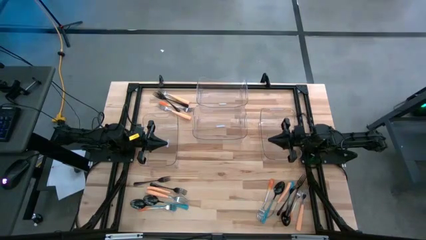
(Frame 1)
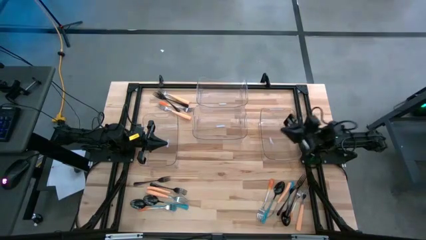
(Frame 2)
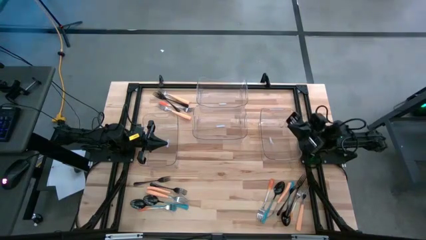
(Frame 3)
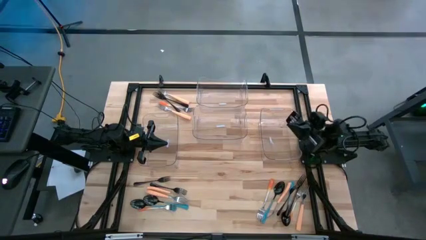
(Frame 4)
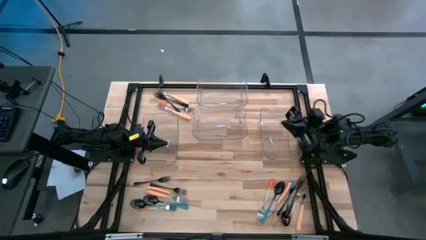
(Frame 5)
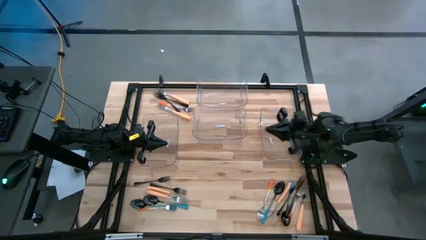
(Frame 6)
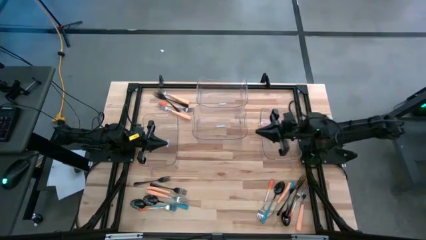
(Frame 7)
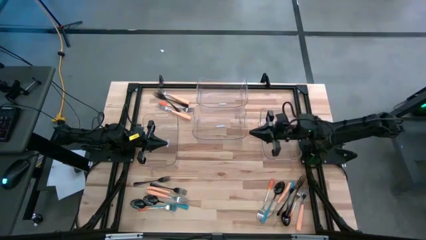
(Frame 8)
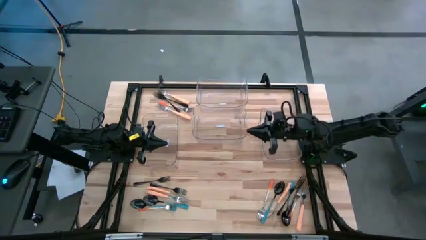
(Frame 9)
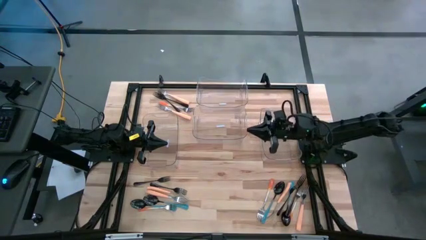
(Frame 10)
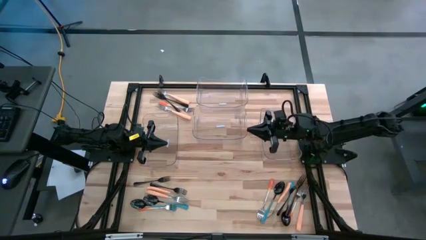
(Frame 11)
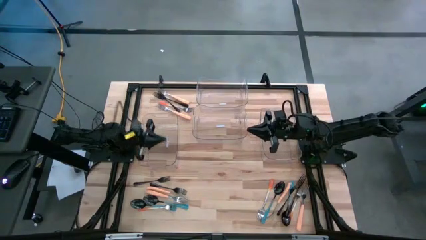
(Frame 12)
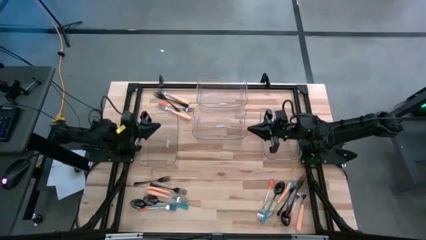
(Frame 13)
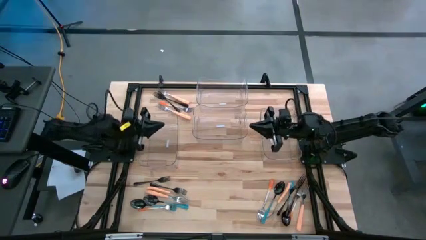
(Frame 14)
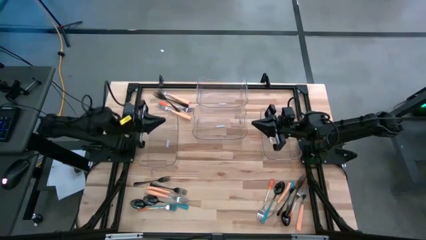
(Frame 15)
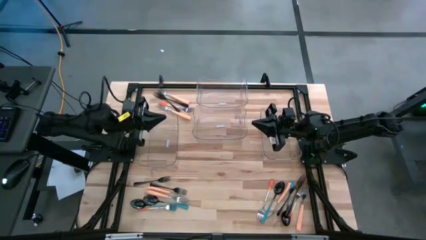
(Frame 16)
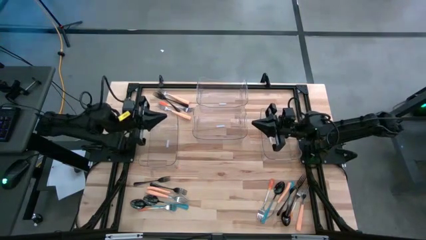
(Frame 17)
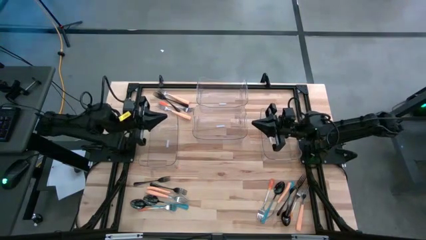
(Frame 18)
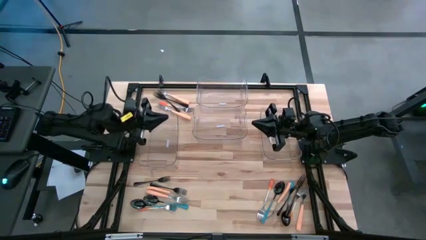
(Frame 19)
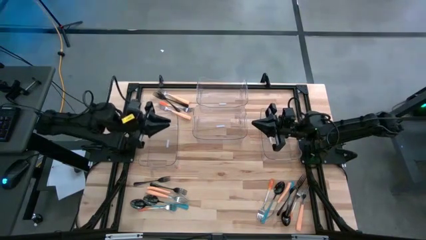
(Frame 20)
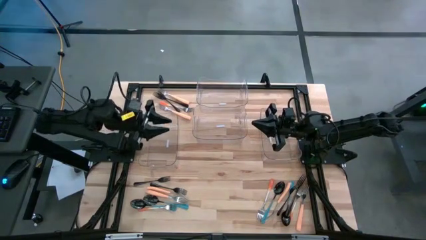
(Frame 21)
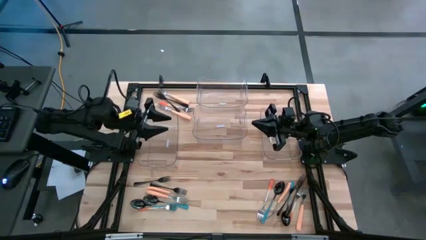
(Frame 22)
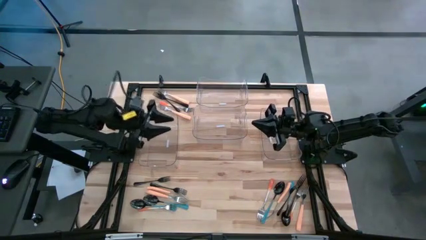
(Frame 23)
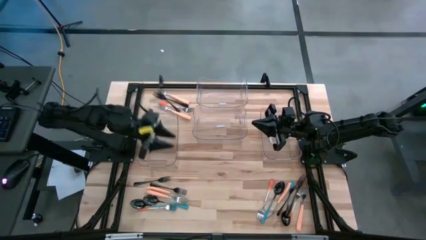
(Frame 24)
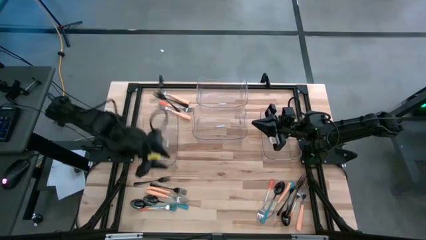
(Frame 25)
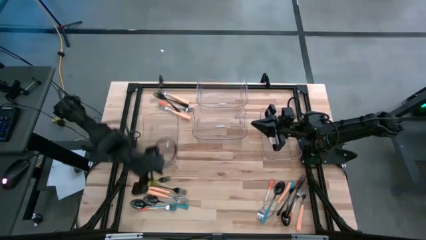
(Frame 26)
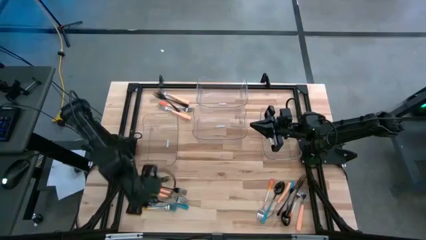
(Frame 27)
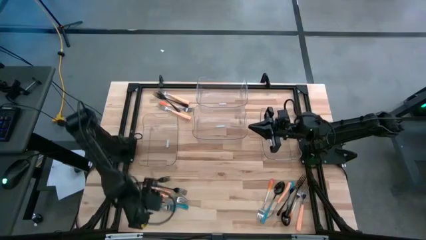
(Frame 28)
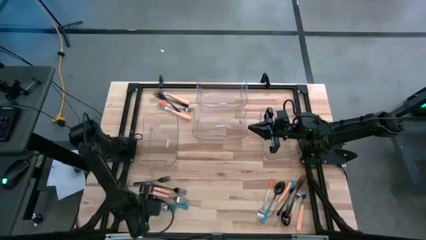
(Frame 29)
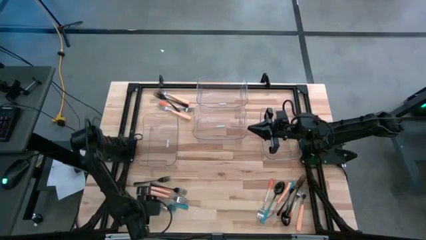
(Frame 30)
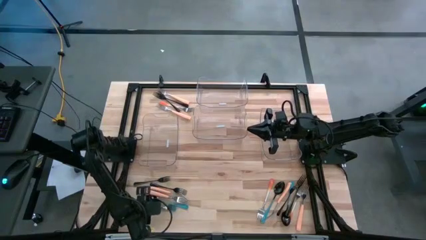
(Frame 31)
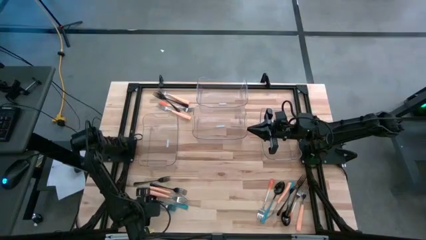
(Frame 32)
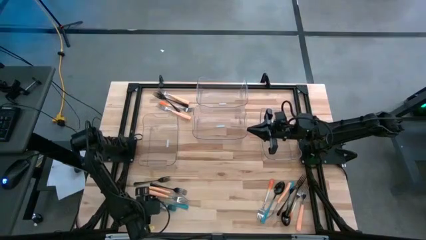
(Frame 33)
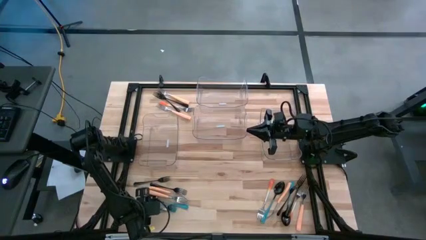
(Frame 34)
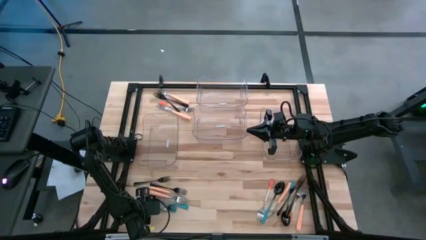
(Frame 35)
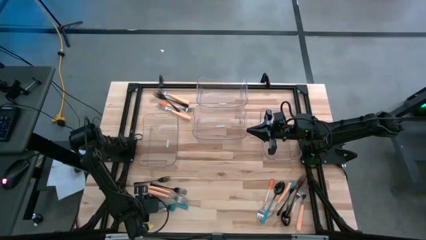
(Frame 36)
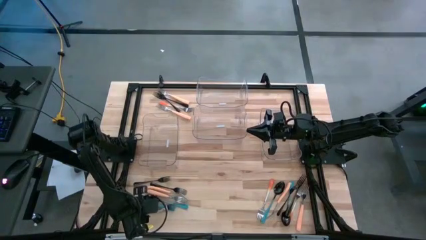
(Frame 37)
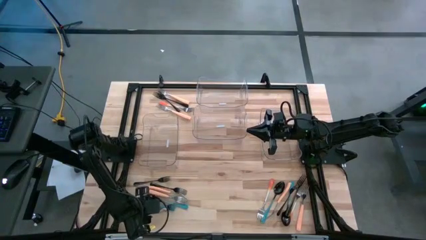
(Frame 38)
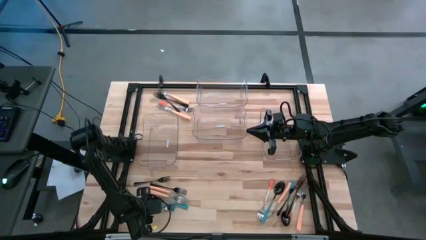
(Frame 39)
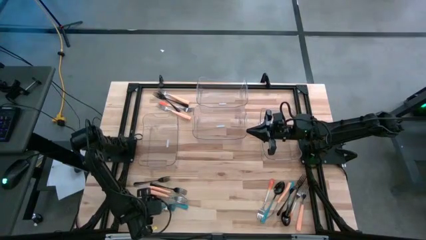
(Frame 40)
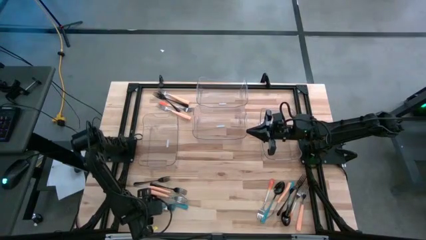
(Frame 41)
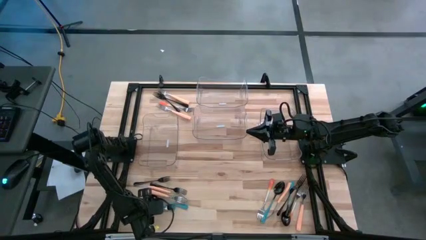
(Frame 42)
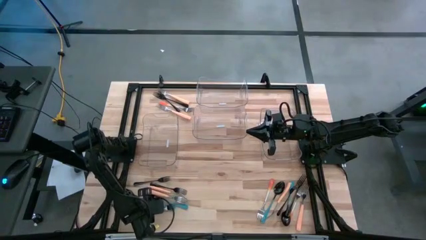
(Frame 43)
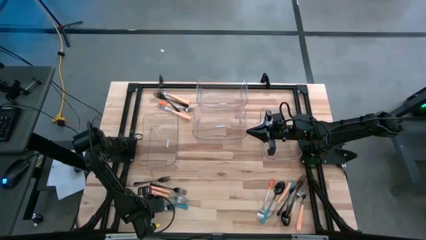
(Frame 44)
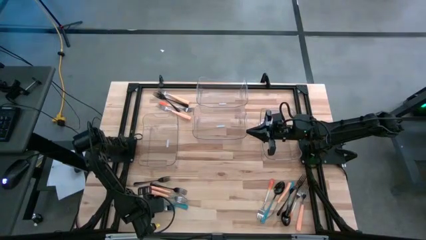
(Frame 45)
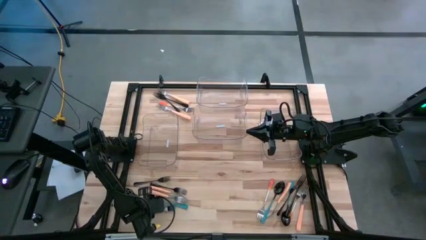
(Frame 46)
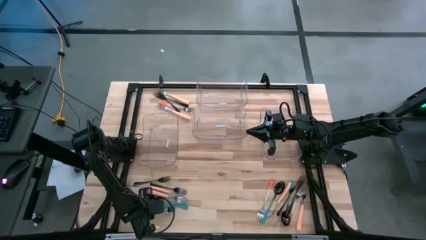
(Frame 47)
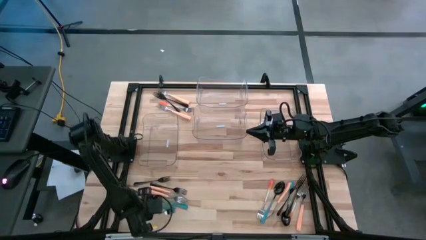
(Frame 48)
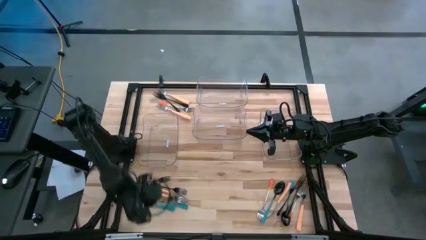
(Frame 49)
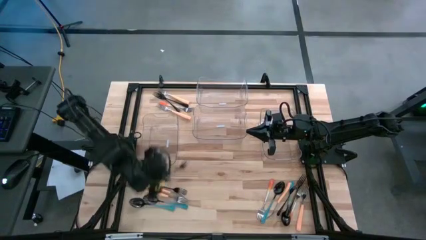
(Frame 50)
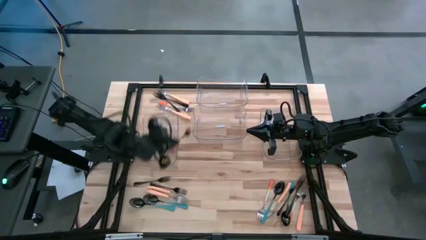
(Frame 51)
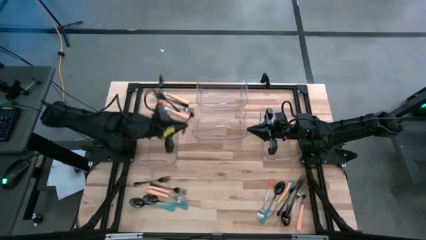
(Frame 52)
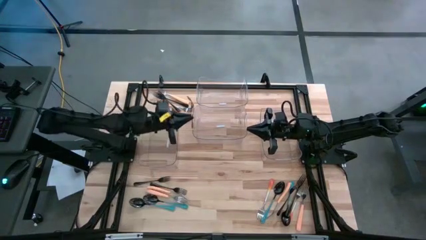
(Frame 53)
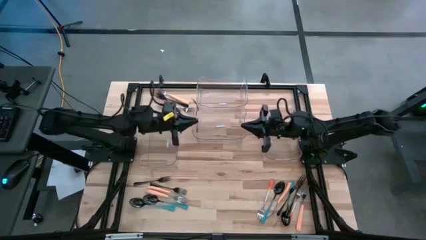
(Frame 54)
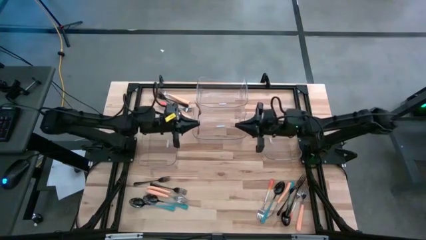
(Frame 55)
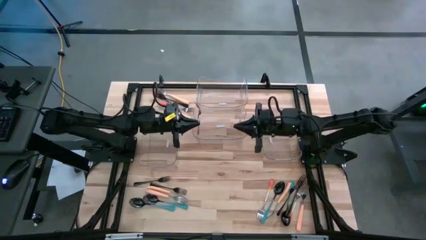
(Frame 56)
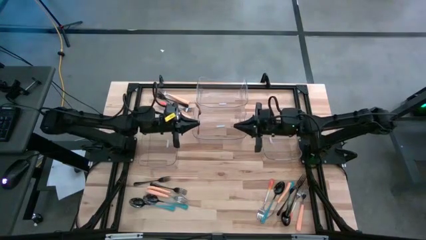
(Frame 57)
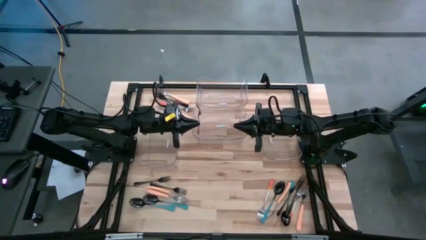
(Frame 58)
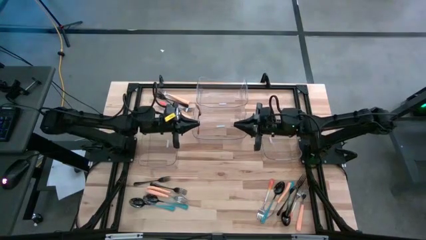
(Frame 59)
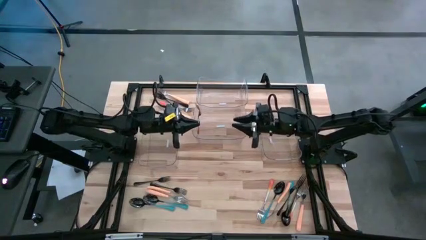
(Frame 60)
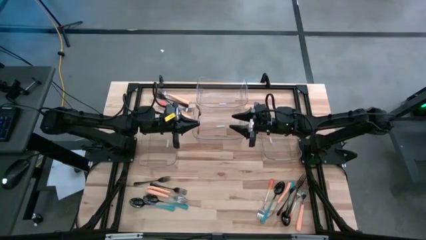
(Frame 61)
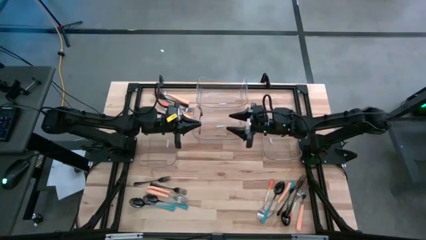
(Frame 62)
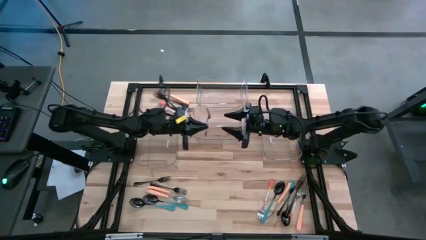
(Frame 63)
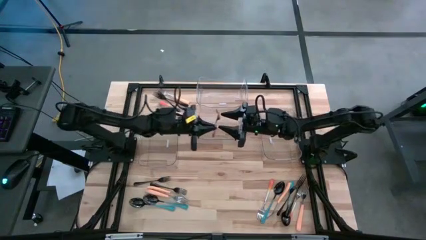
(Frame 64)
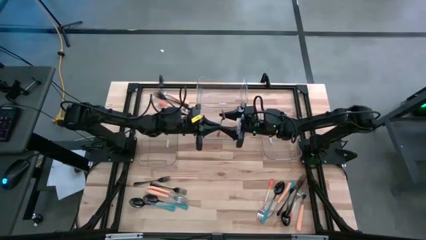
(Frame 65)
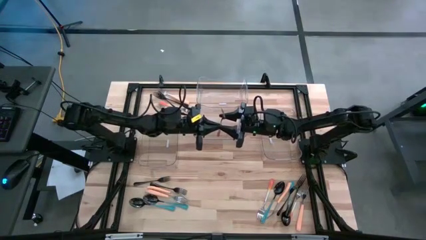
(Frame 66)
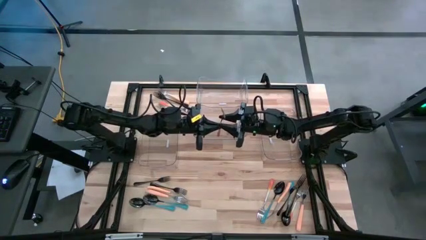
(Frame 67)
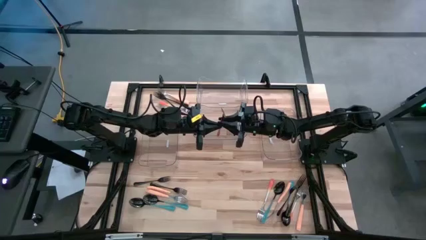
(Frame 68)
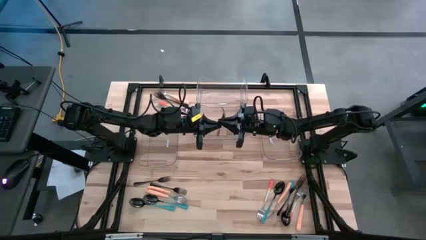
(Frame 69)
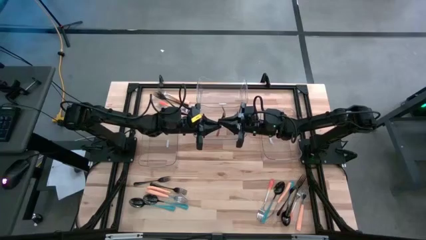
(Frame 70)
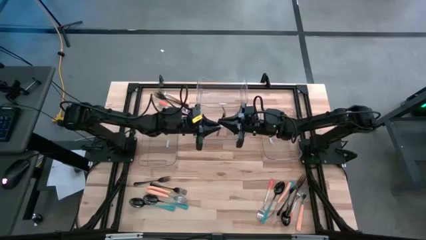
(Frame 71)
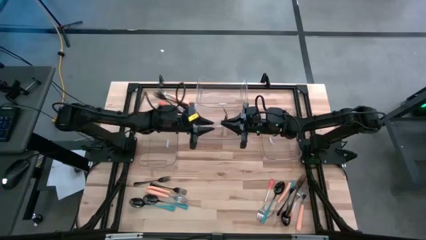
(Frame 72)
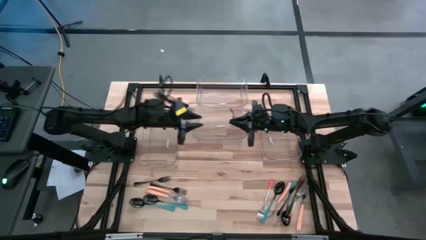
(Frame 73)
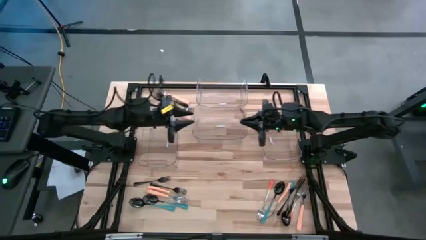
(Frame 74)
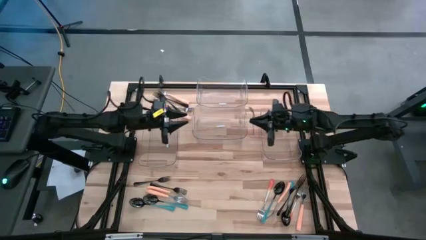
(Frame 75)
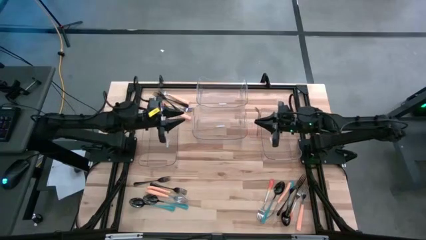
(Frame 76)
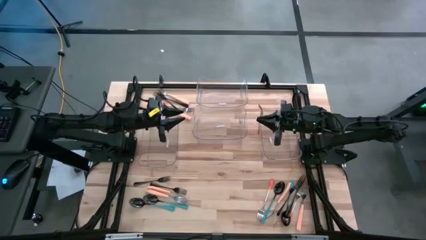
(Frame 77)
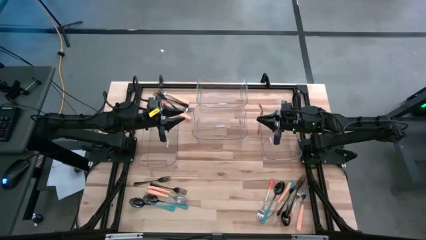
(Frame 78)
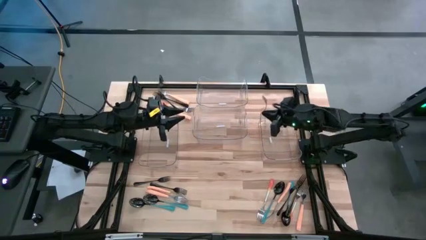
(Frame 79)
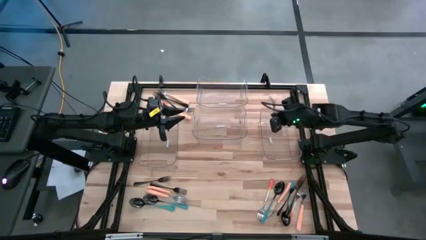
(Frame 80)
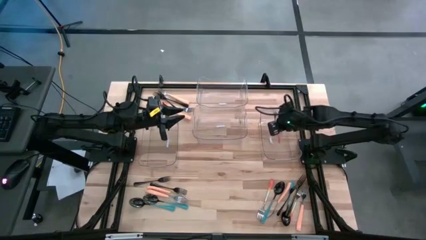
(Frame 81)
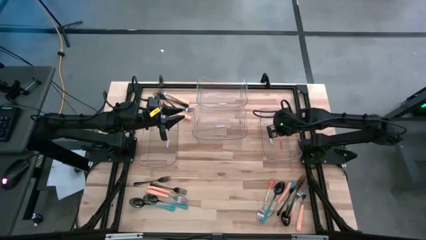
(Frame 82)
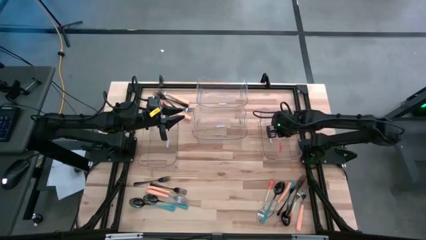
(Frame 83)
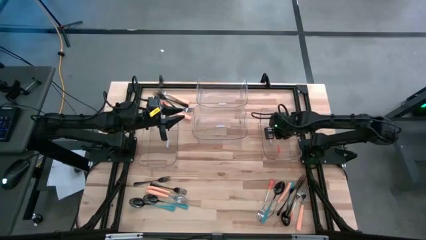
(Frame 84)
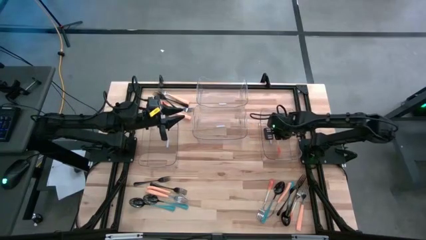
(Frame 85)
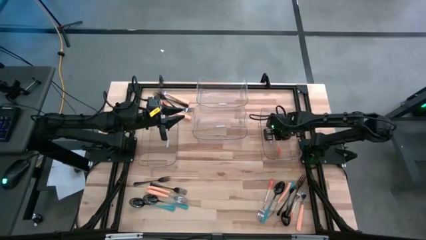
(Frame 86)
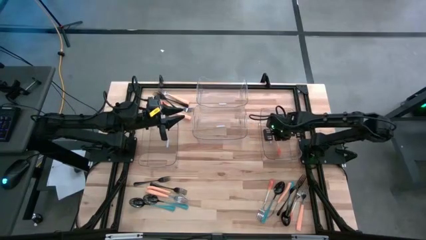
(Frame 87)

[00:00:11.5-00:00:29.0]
Task: Sort silverware by color (type)
Put the orange fork into the bottom right transparent bin
